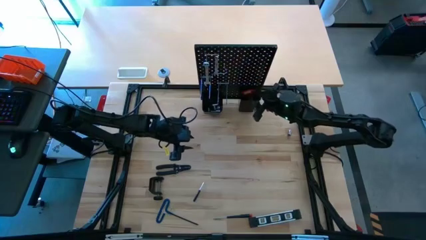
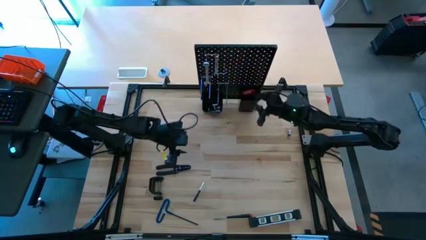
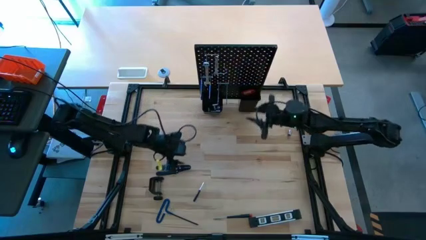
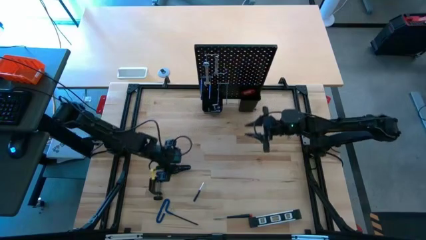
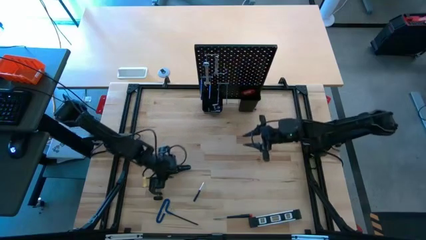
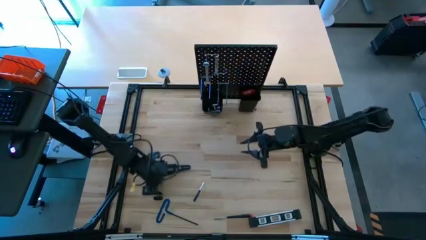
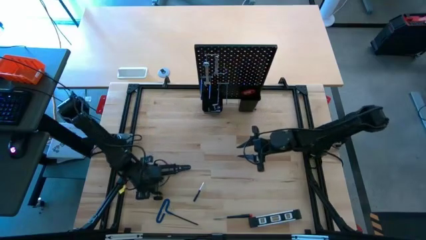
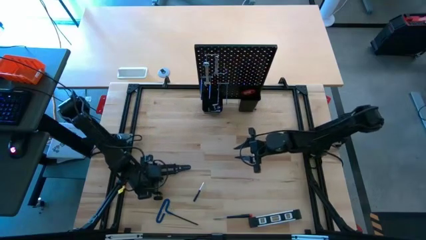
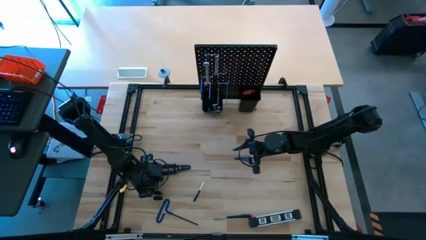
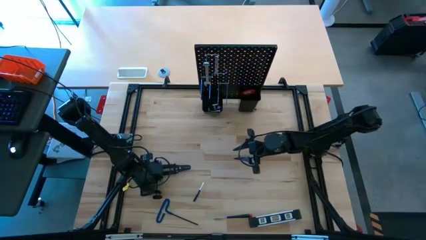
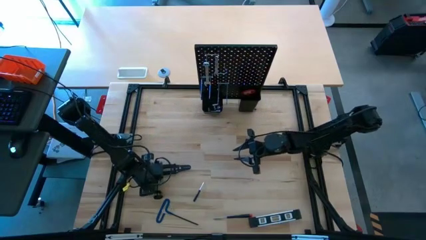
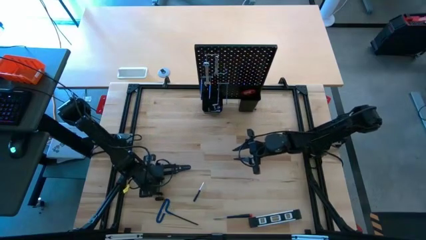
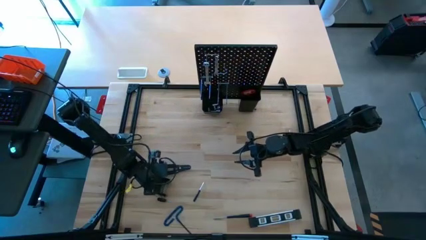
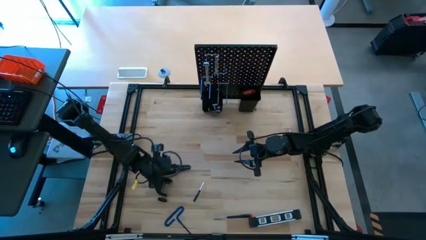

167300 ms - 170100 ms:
Task: Hang tools onto peg board
Hang the clamp on the pegboard

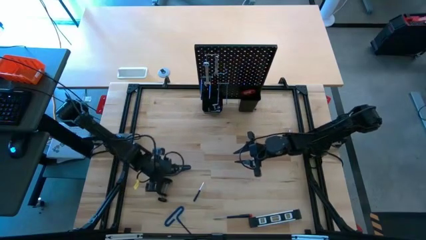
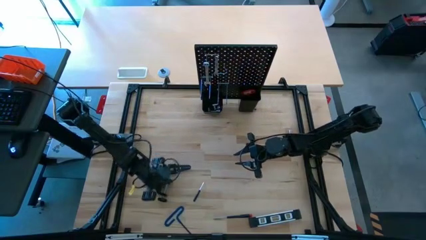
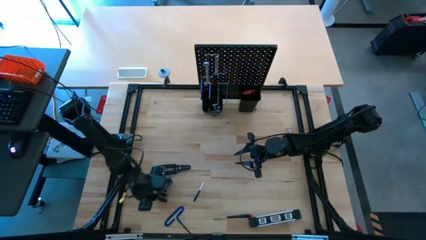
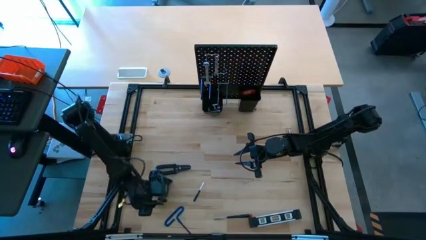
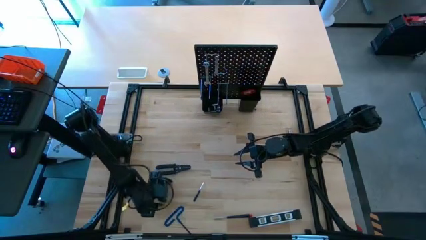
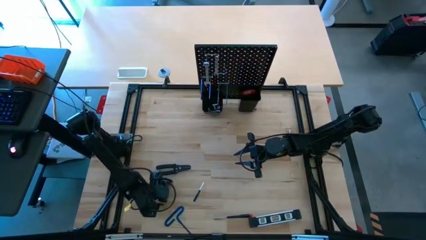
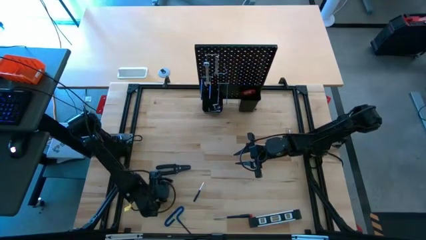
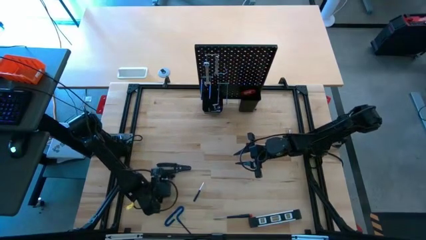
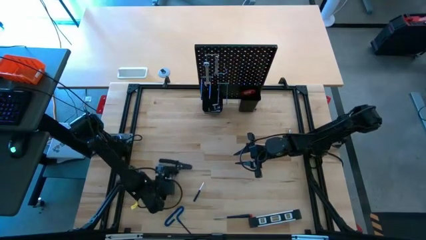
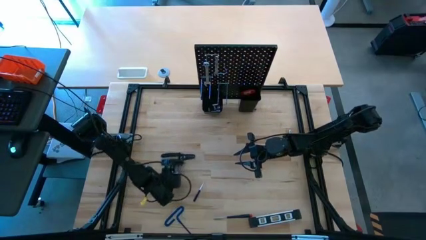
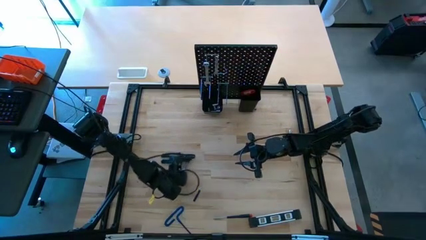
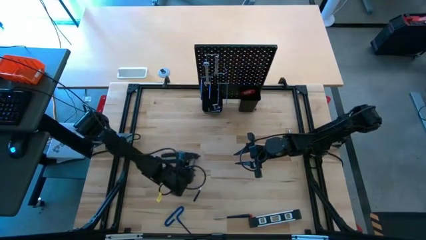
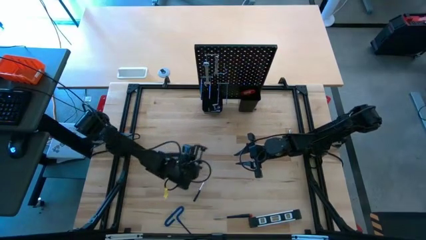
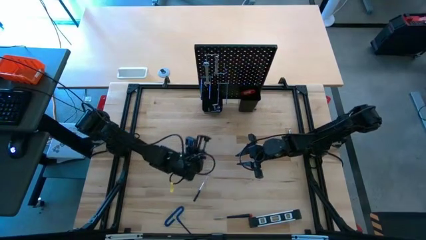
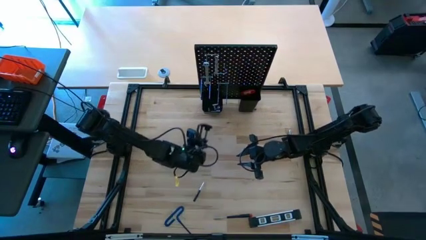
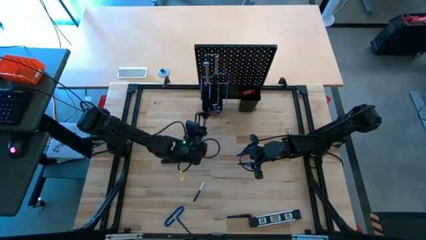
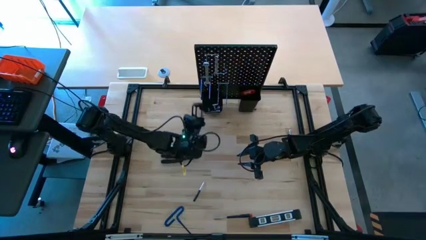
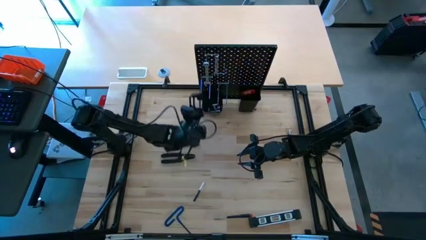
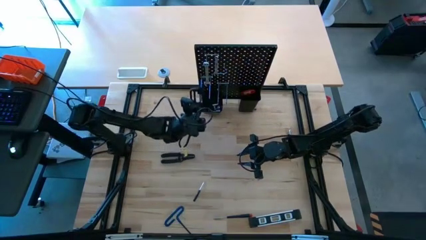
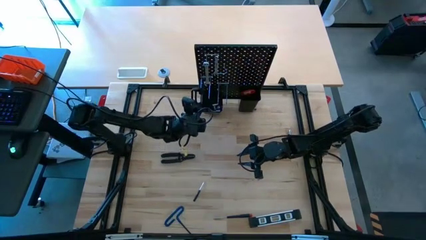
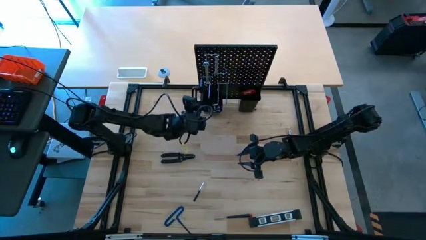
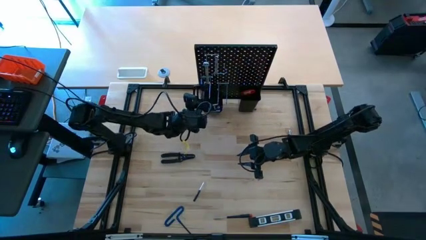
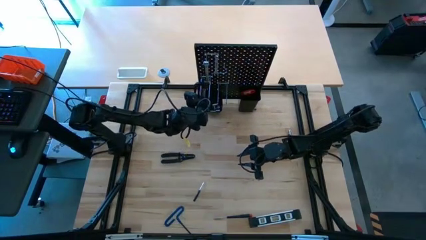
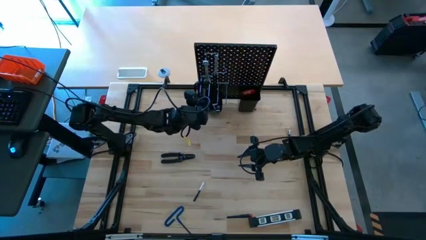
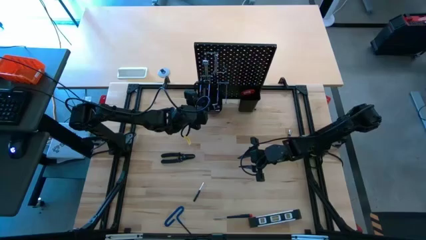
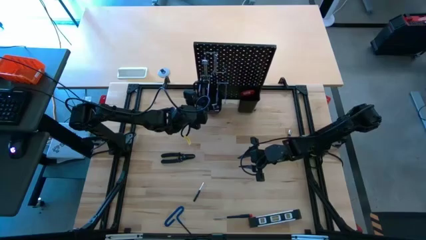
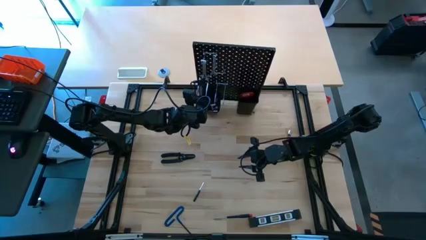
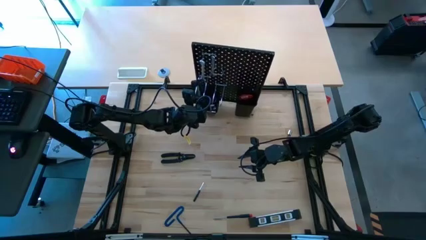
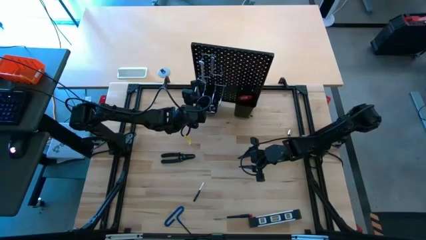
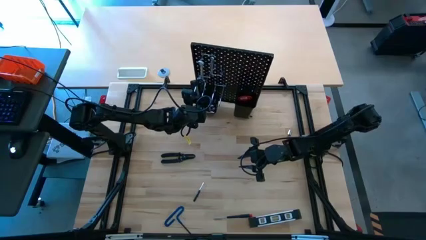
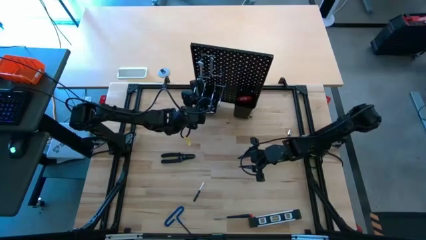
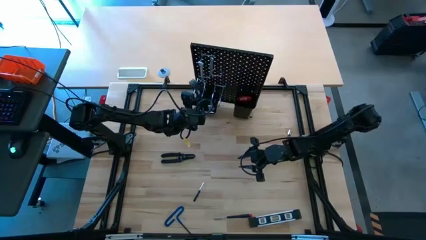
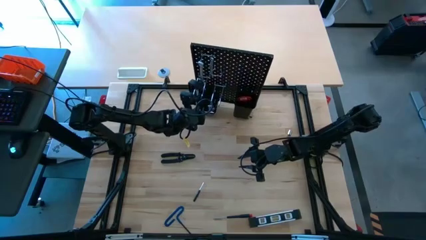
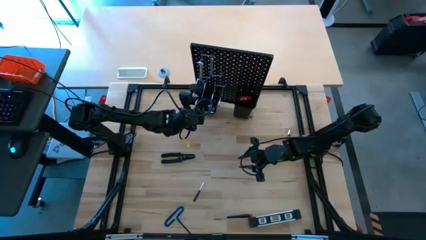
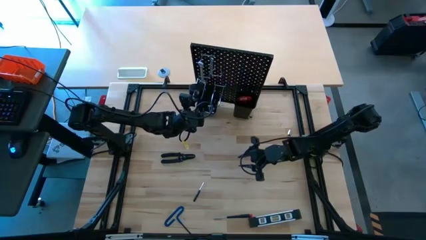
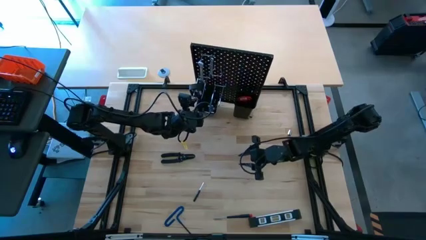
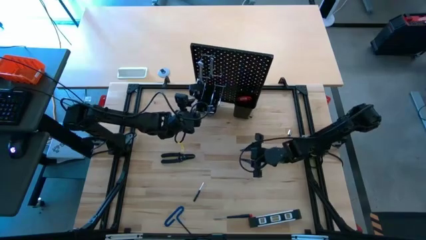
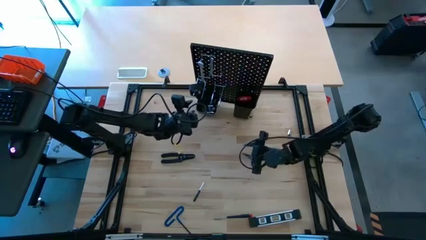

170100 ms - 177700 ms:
Hang the clamp on the pegboard

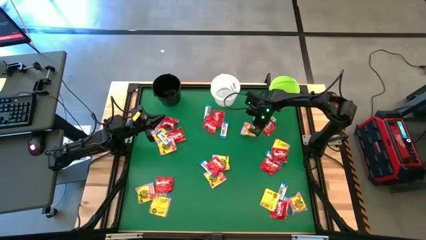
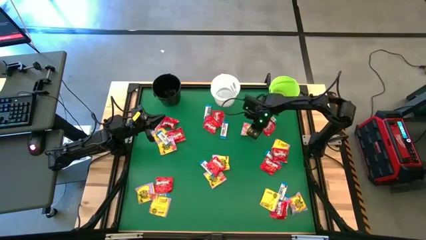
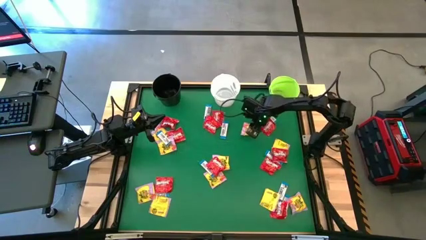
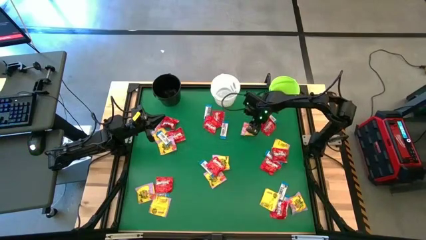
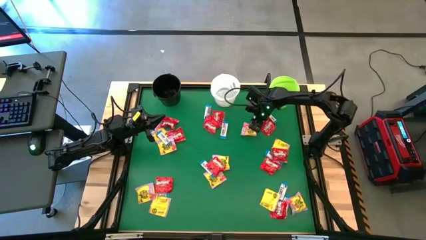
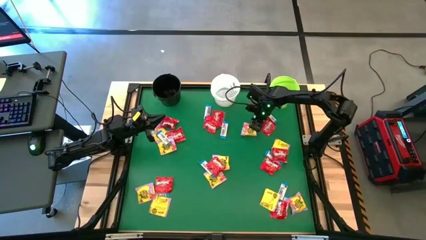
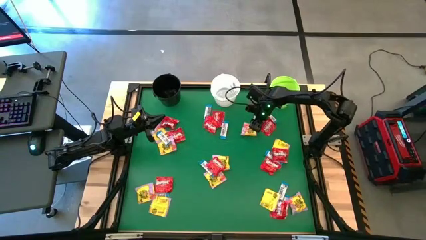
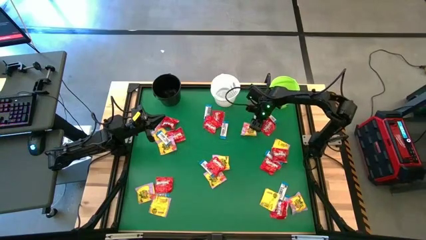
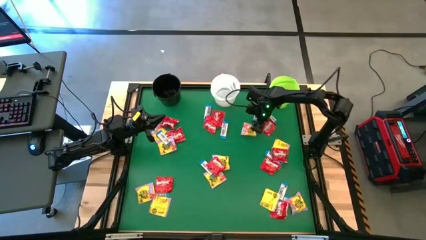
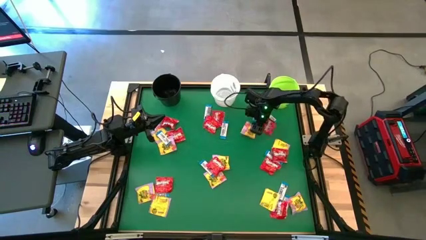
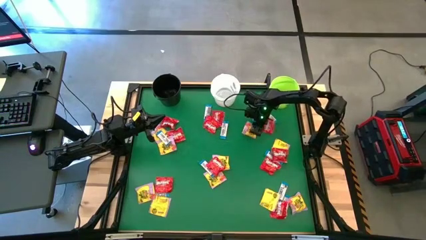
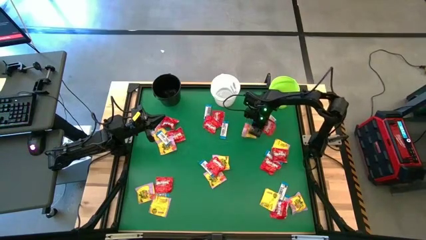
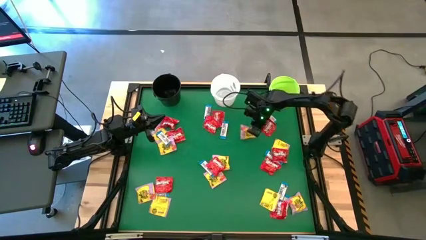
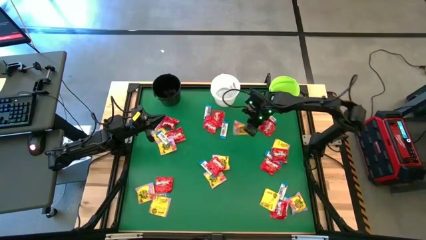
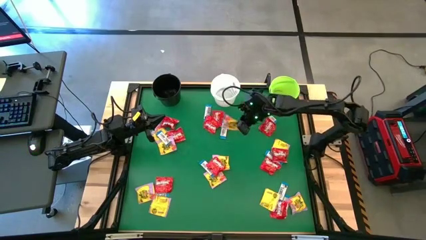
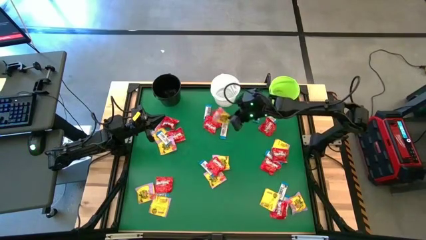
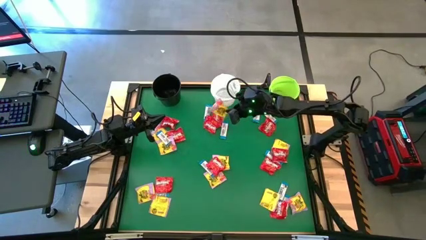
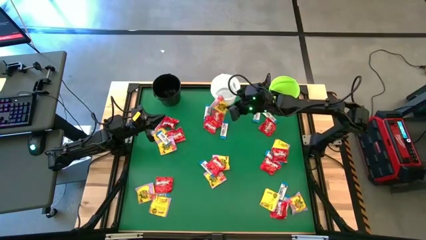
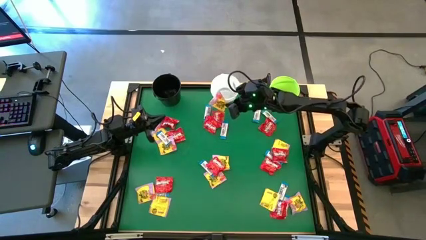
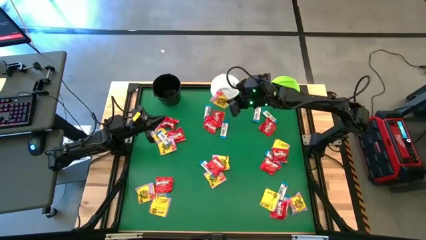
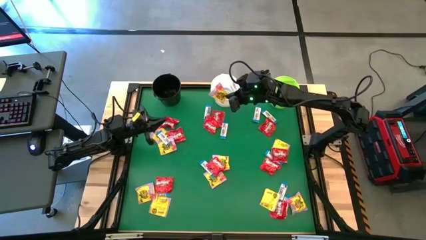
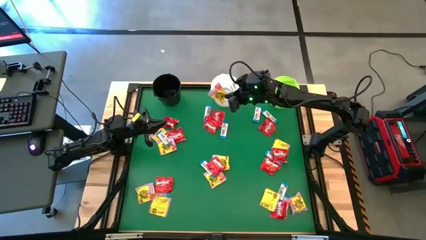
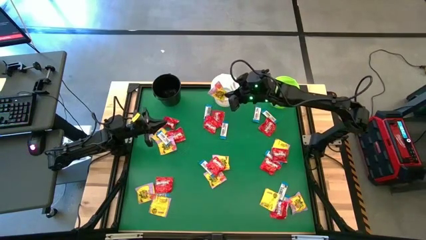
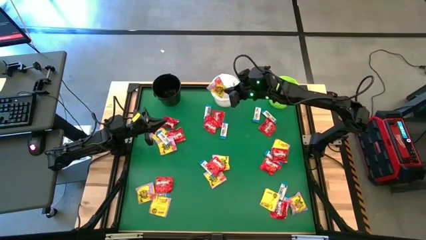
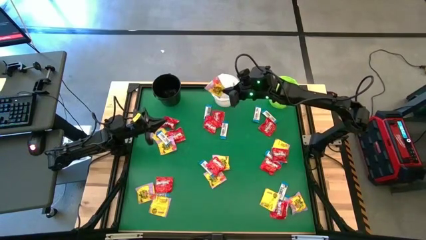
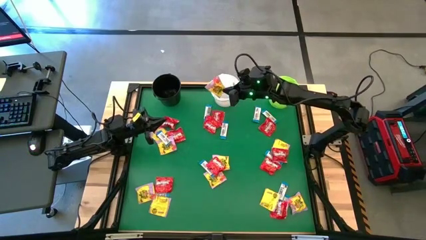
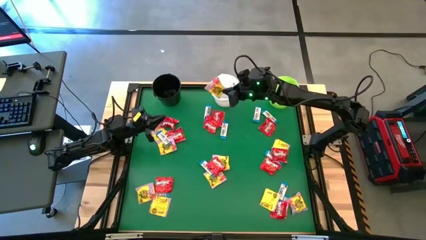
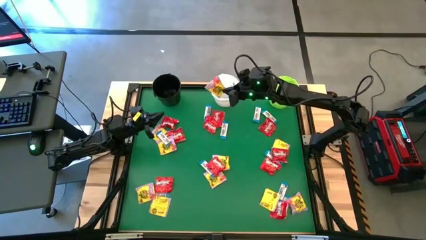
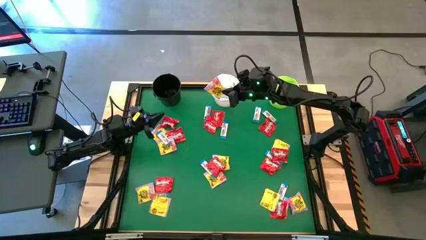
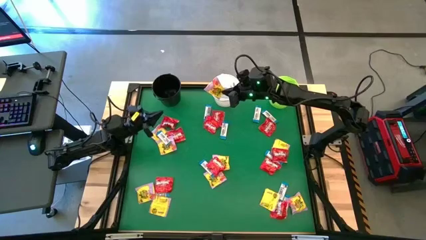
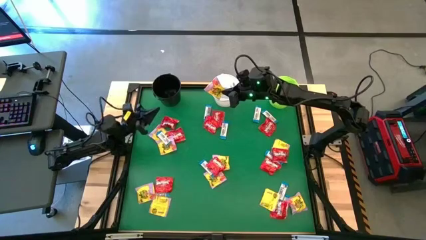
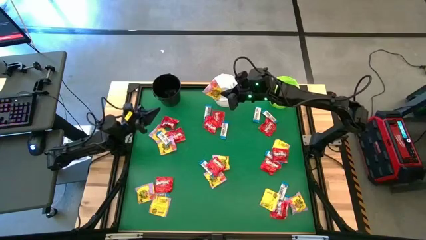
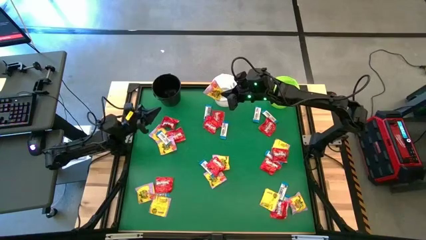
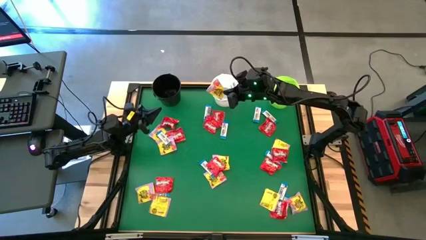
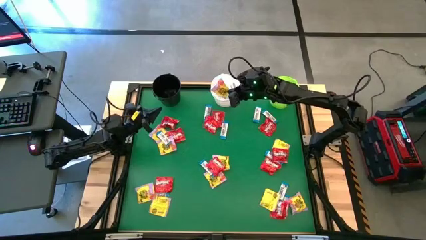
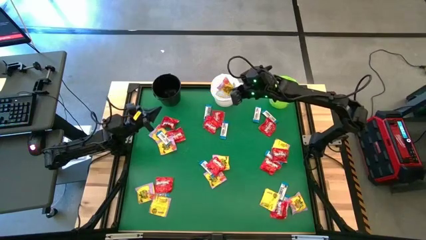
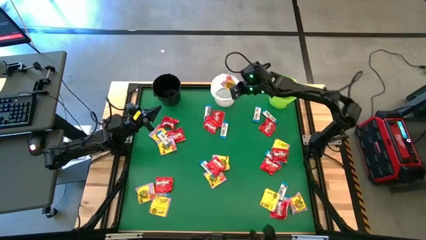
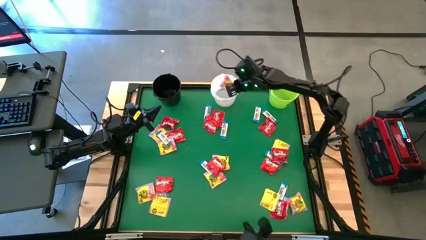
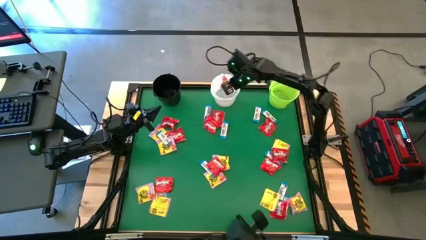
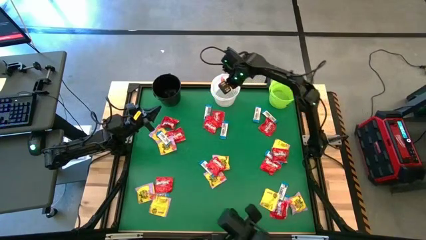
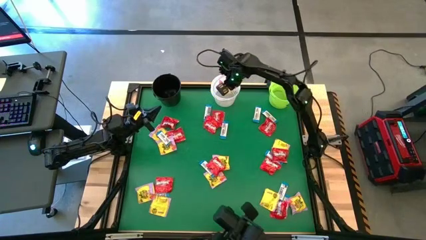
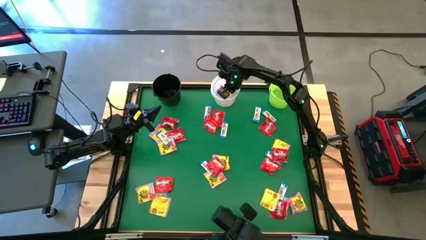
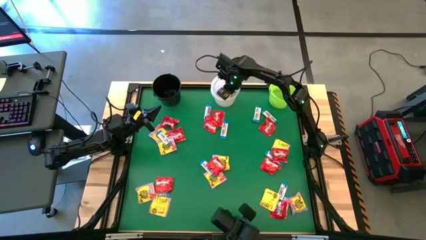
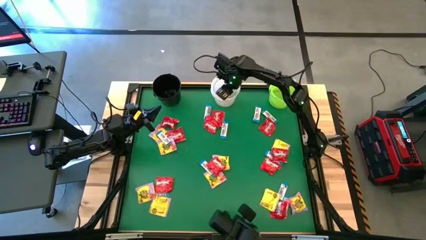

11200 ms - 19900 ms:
Task: Sort candy by brand, put in halloween buckets
Put the yellow candy into the white bucket
